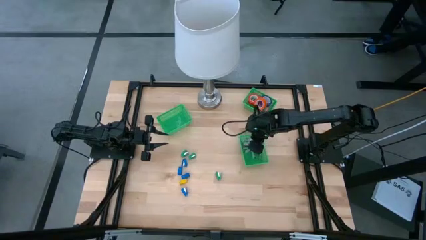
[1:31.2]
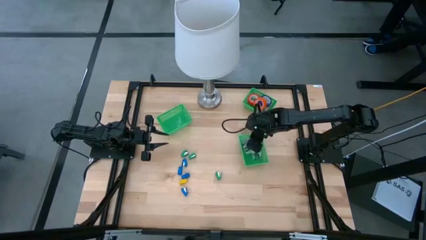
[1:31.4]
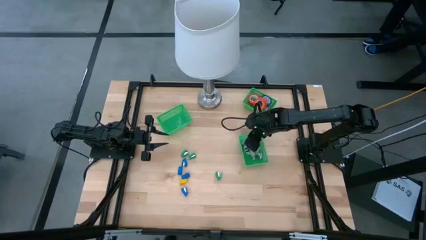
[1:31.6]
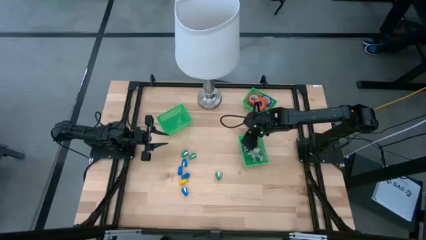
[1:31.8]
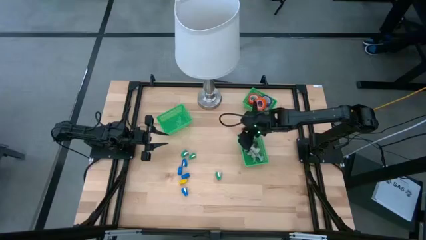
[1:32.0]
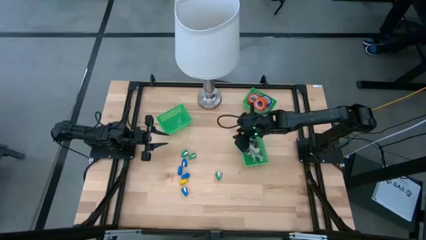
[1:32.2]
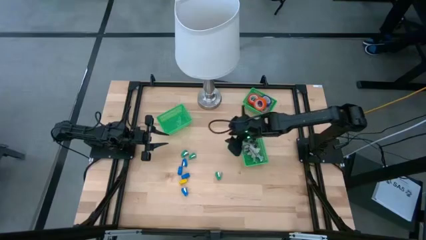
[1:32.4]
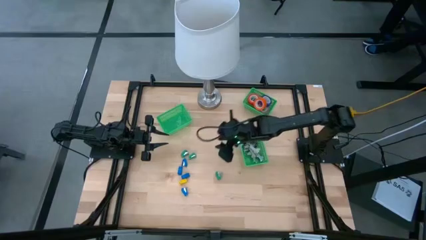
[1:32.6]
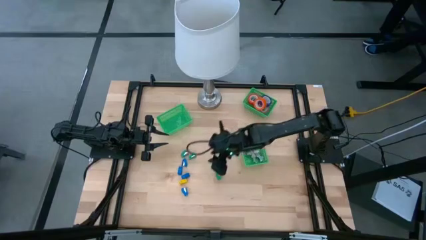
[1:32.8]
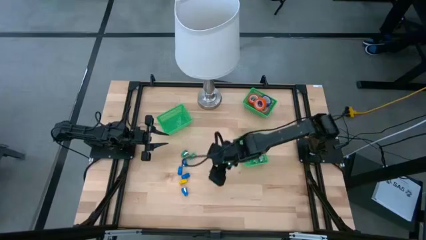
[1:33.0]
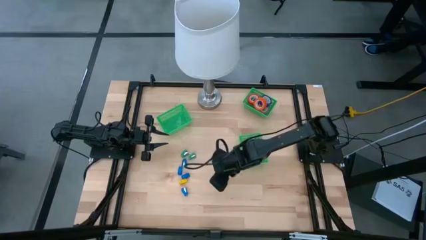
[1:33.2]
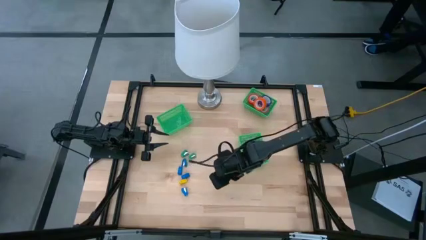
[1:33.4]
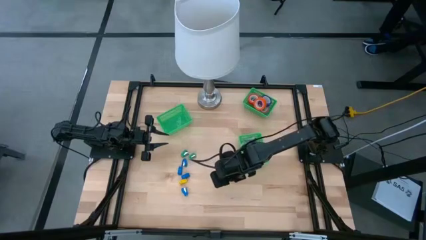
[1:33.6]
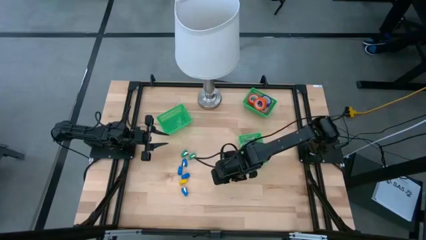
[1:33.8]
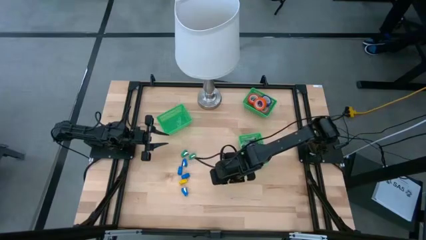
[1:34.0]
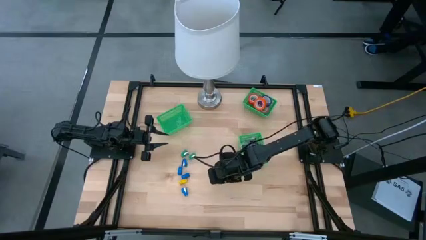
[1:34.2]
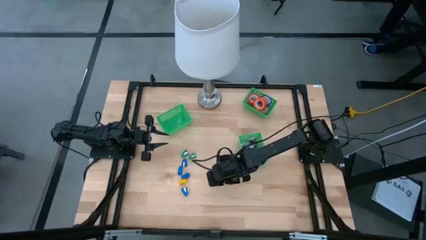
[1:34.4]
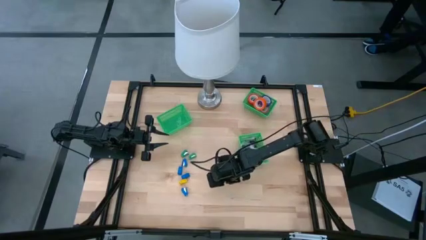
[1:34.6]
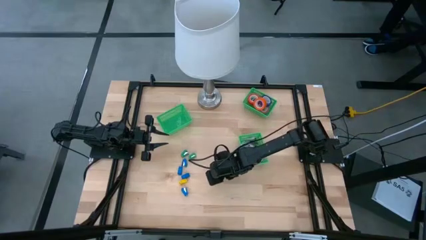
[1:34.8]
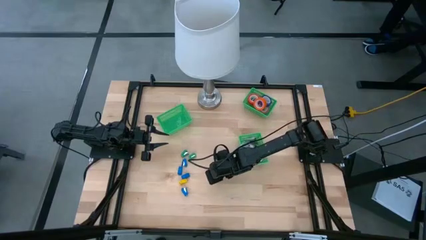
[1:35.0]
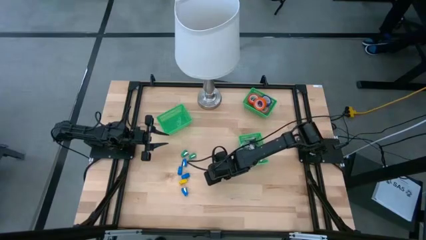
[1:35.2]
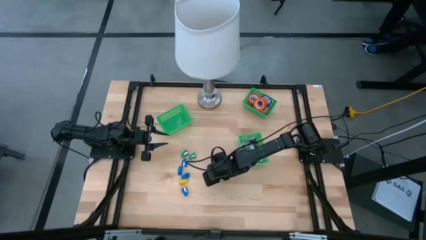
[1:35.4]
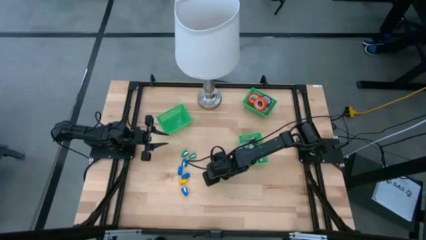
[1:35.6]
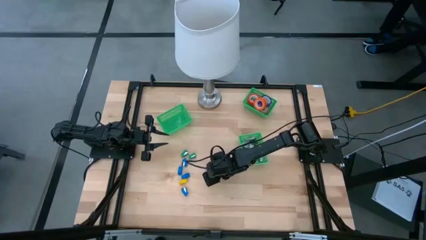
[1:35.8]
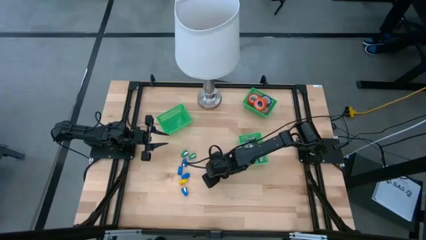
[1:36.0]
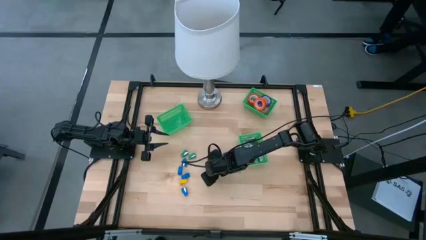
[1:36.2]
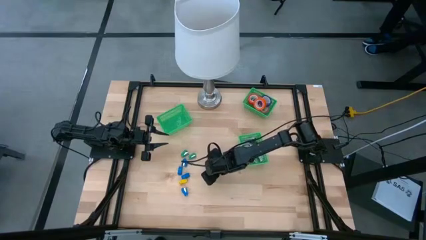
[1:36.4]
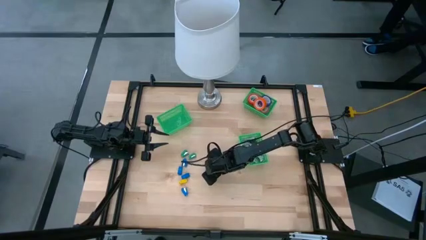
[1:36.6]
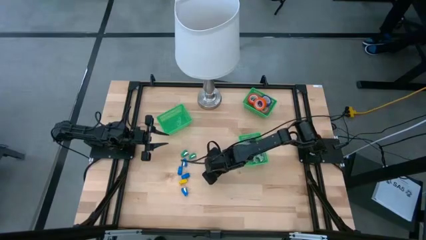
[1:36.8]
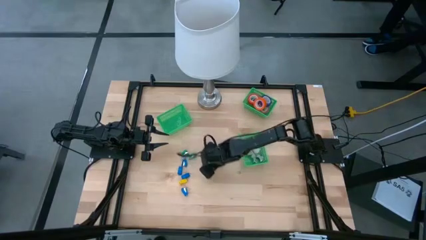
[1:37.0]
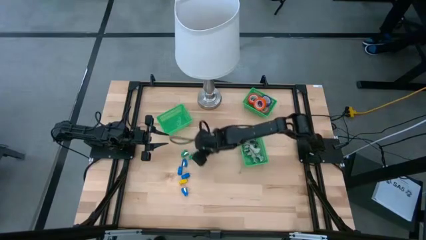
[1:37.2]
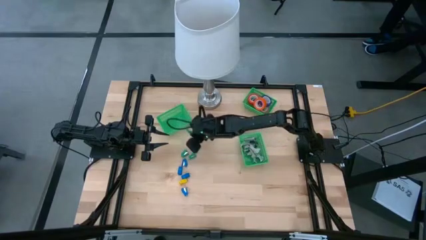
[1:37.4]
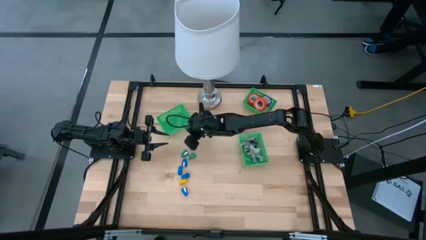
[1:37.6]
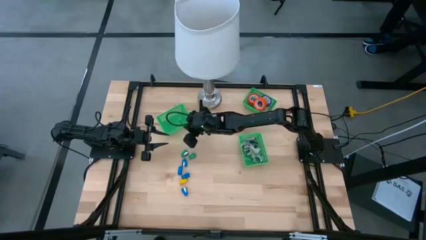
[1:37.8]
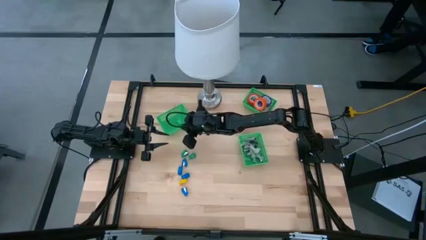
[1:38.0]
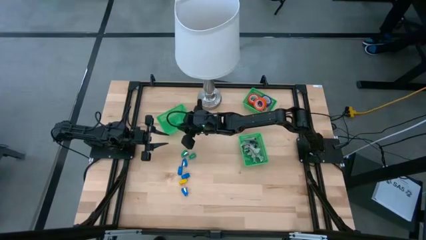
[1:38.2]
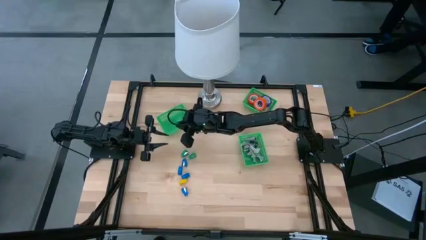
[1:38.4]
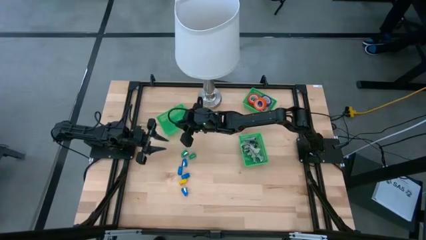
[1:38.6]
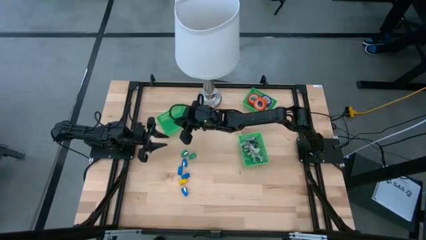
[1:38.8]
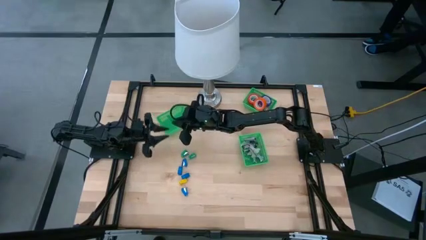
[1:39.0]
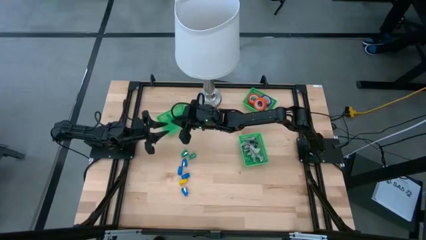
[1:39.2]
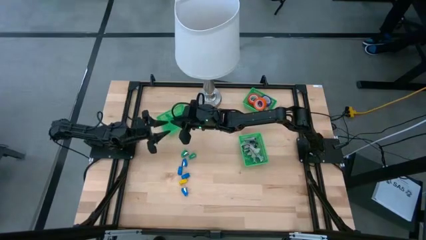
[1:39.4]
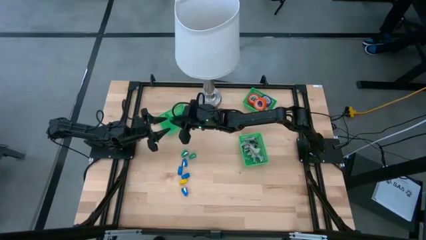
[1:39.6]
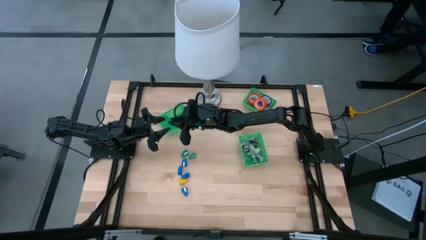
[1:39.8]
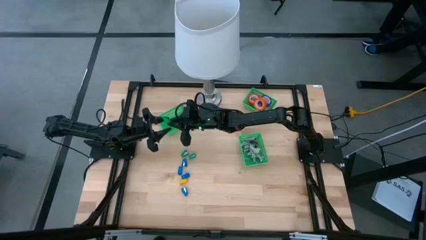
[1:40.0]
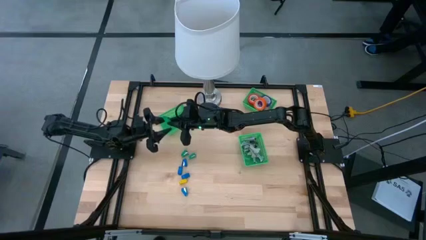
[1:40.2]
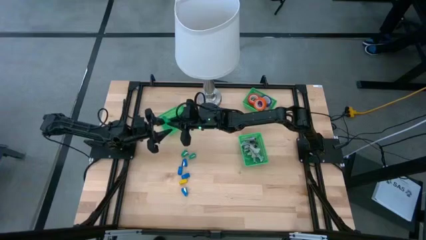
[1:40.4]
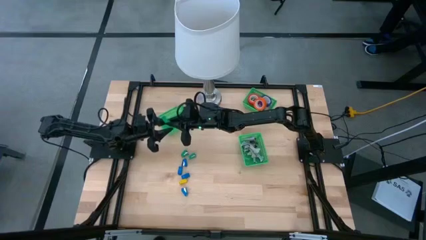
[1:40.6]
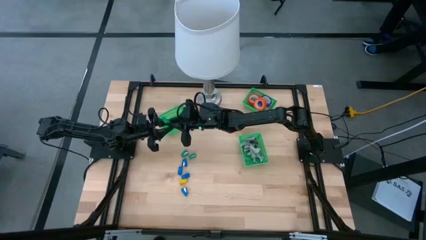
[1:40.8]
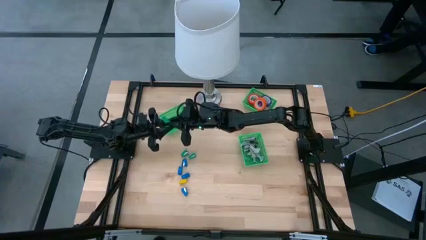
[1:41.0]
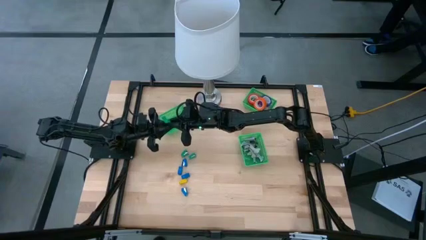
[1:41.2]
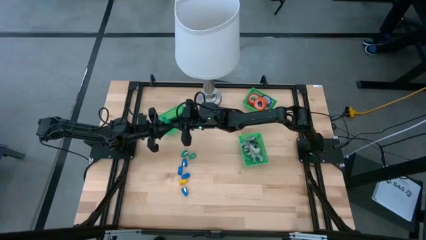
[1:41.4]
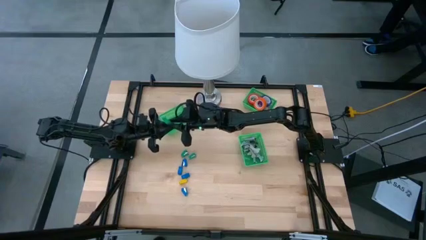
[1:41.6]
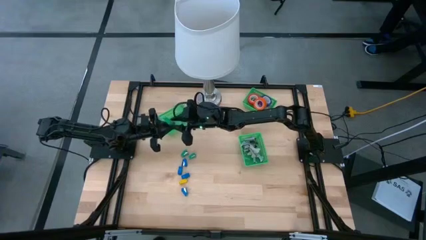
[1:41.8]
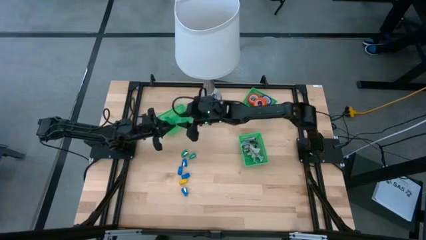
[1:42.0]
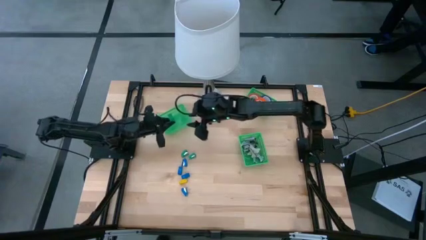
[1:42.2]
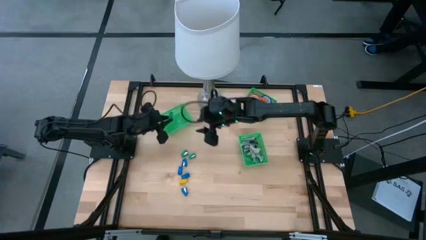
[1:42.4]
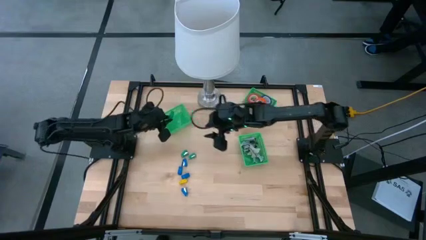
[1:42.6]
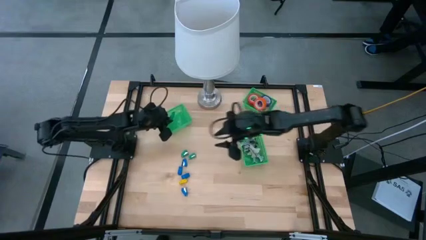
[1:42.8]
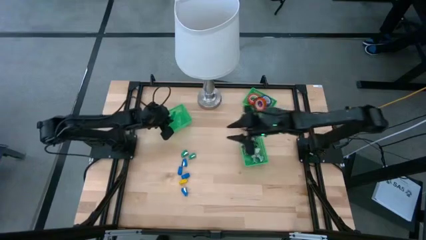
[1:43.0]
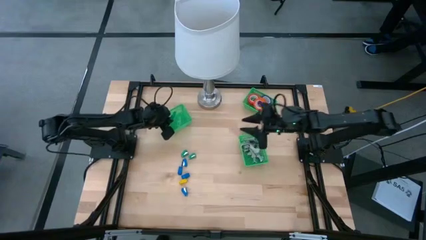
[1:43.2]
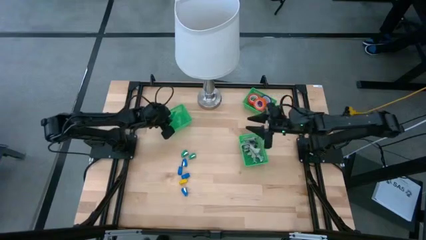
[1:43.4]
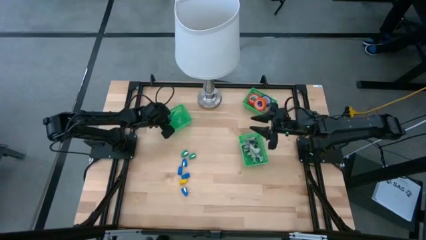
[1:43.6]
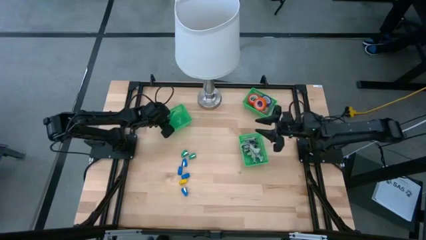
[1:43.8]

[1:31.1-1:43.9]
Task: Pick and place Stapler, Stapler remover, tape
Put the green stapler into the left green bin

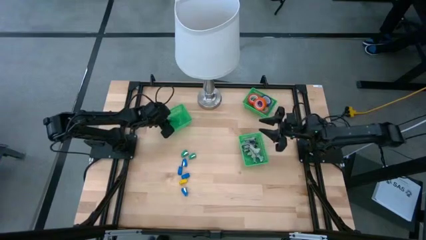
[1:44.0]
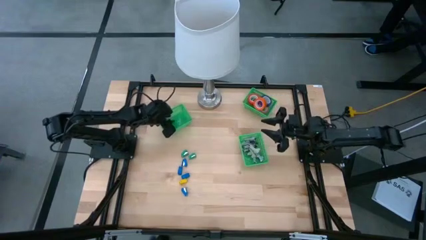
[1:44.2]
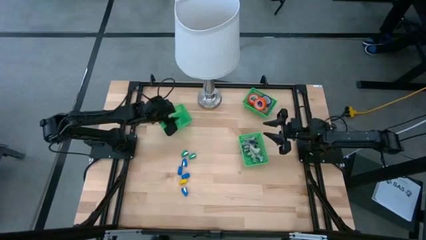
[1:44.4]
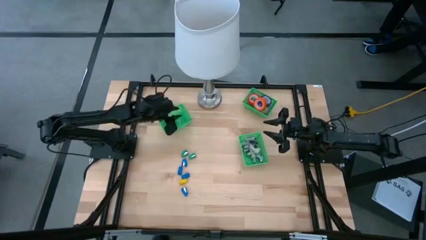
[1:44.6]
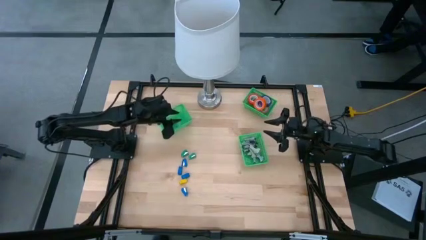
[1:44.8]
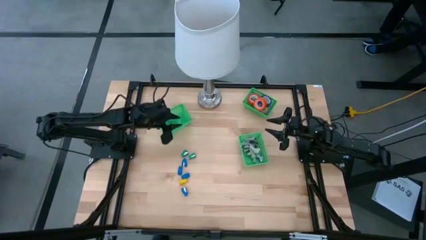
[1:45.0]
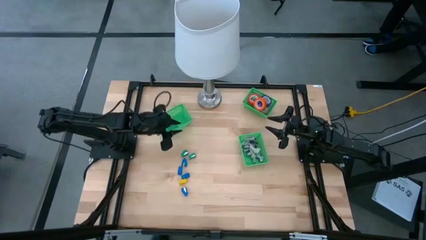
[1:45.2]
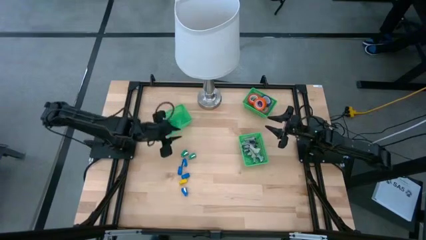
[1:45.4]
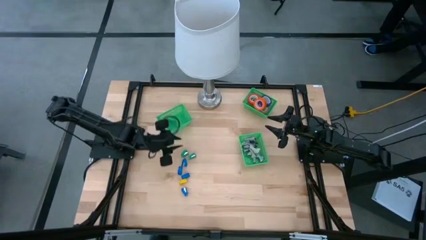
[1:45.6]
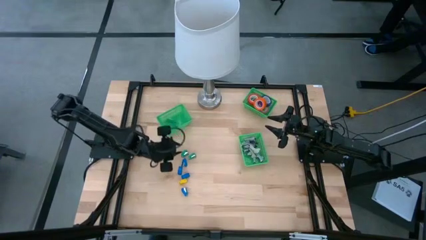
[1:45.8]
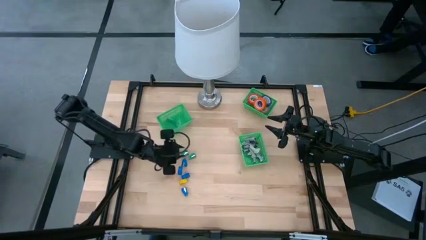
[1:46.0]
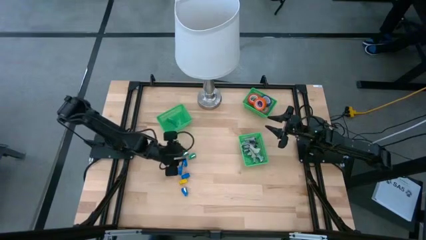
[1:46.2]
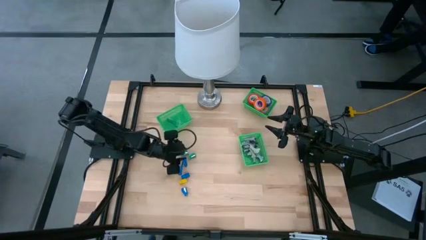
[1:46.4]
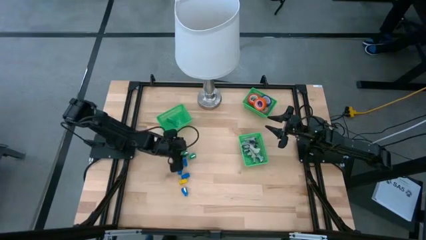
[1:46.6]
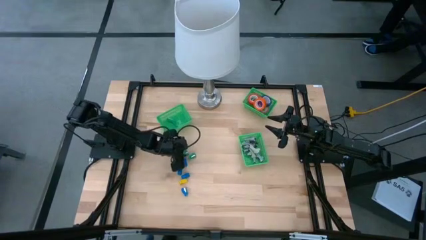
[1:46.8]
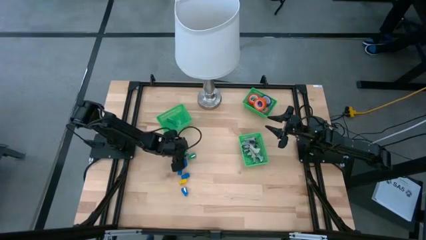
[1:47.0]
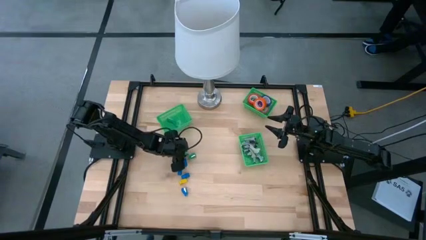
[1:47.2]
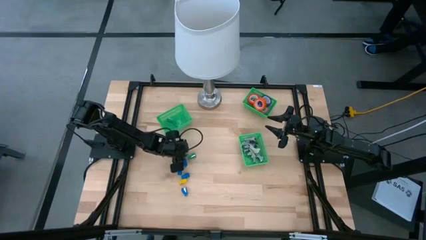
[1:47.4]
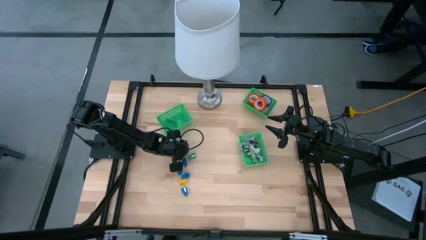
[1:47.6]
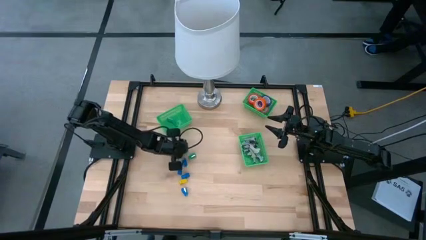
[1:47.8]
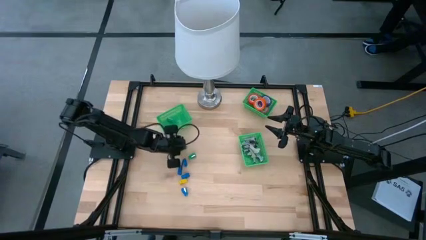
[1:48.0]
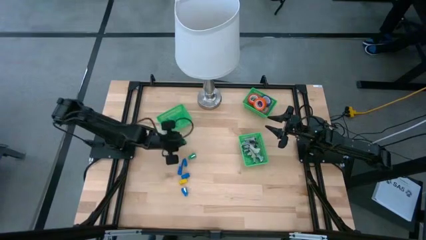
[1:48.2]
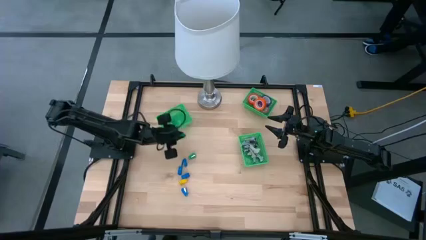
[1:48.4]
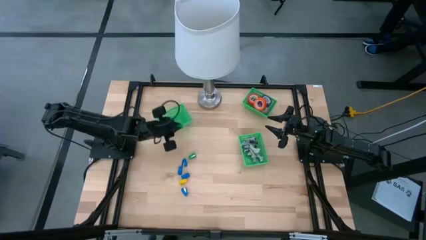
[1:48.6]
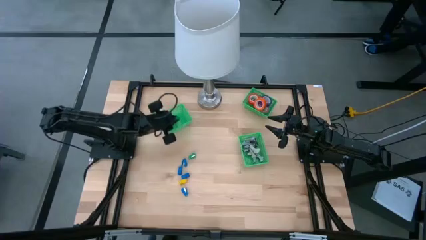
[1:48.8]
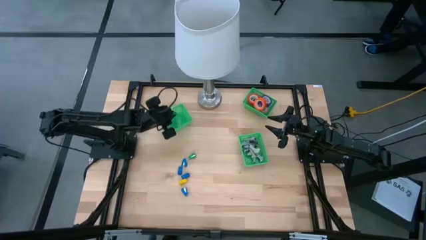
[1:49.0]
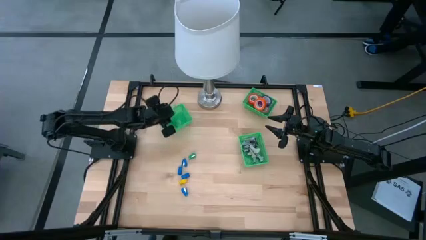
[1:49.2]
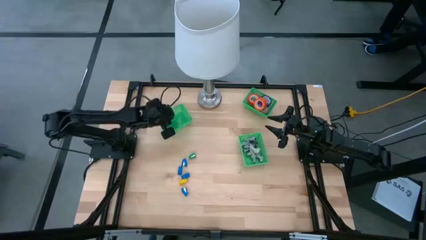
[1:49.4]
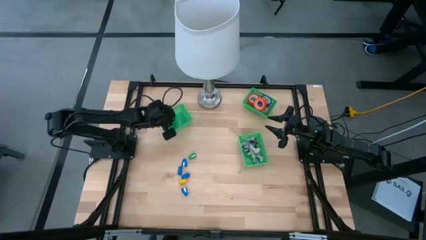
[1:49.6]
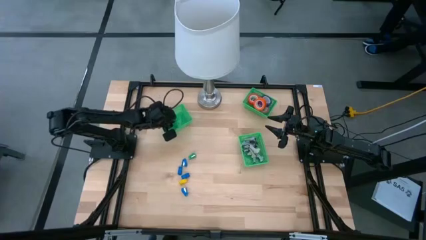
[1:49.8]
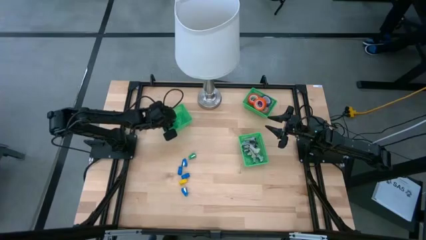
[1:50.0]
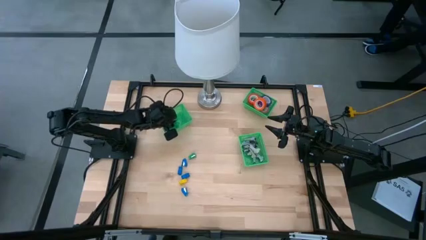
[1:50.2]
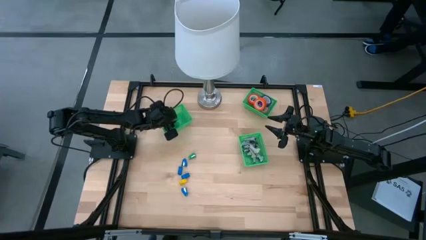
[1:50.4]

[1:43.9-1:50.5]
Put the green stapler into the left green bin
